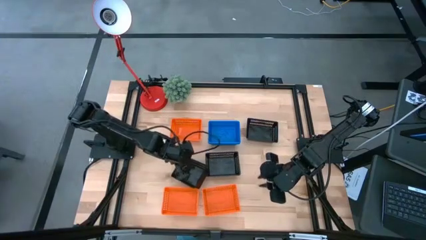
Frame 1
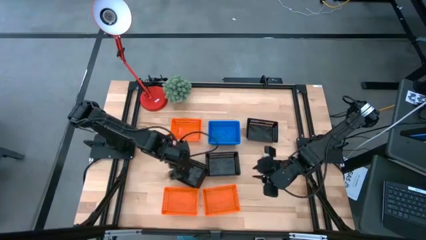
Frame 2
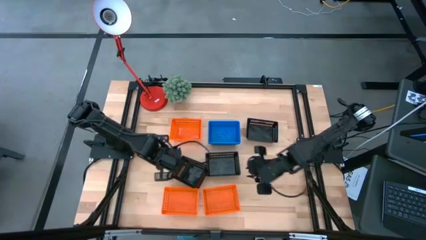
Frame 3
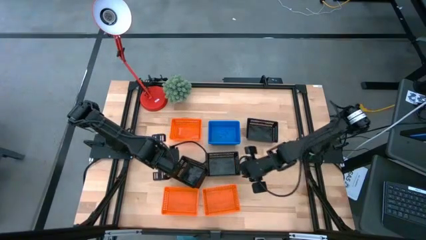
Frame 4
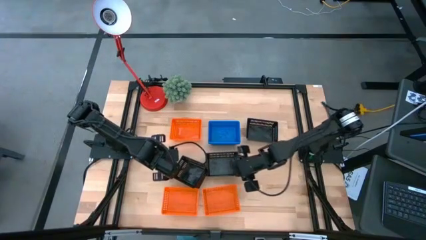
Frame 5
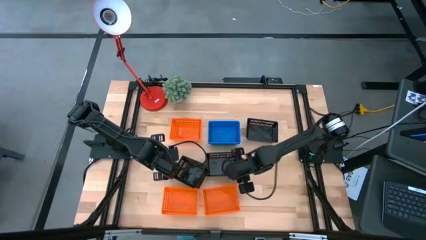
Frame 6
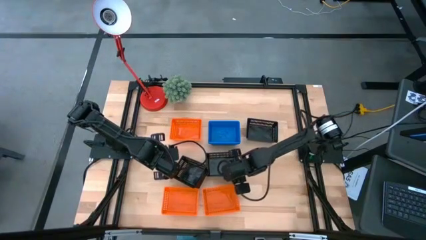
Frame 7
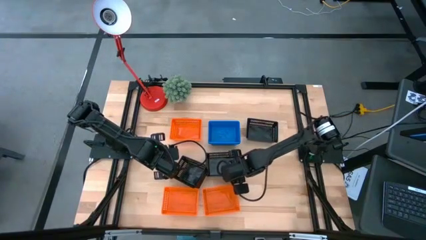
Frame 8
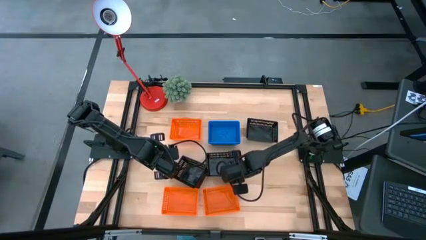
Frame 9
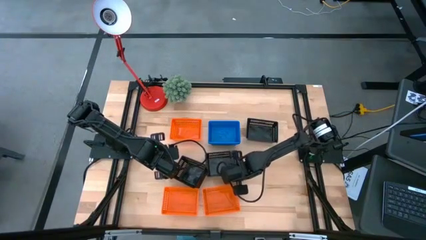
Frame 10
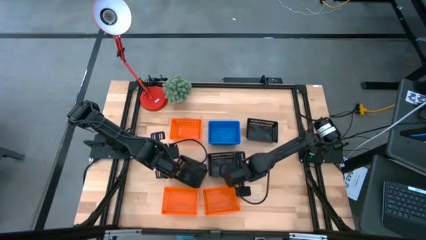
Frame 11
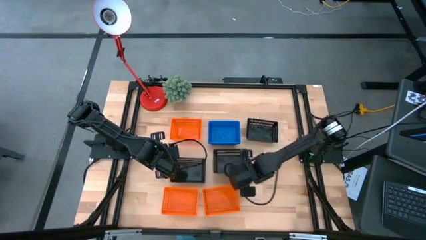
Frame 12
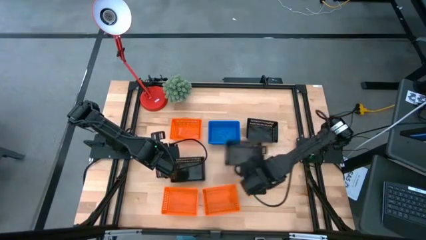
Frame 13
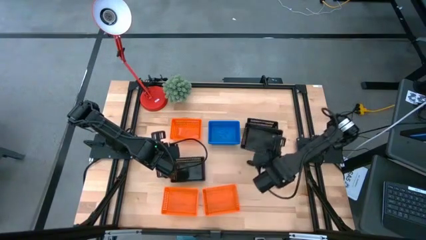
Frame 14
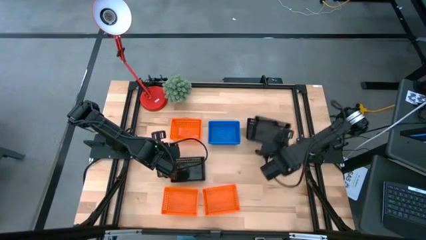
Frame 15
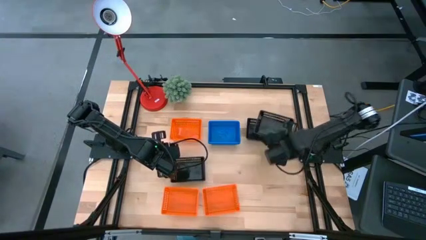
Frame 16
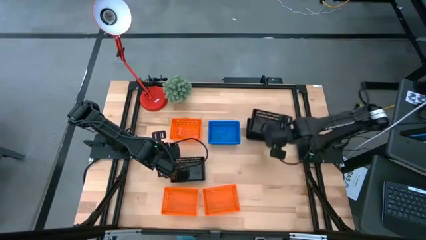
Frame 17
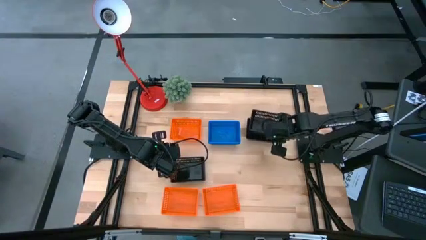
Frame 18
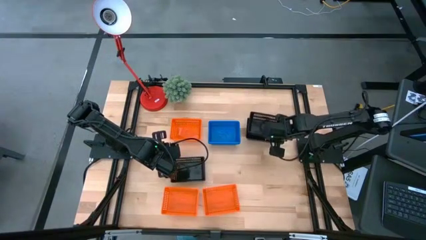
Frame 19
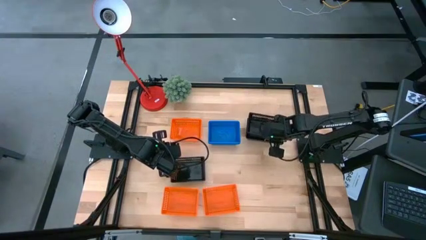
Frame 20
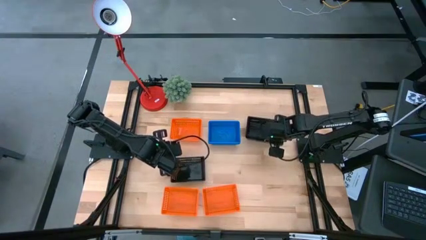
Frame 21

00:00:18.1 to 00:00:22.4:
Stack the bottom right black bin on the top black bin

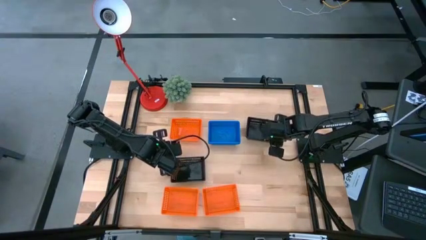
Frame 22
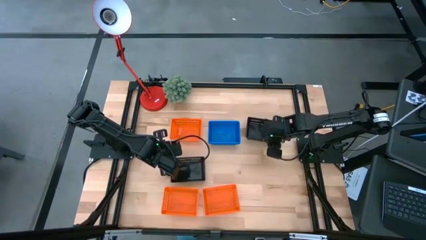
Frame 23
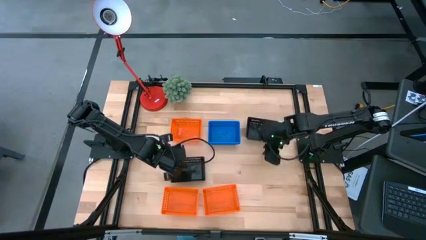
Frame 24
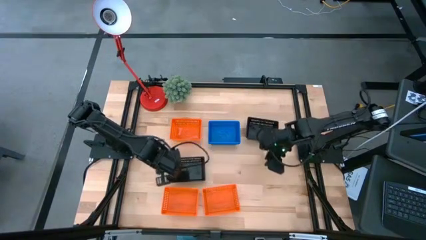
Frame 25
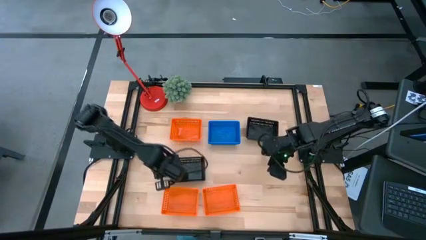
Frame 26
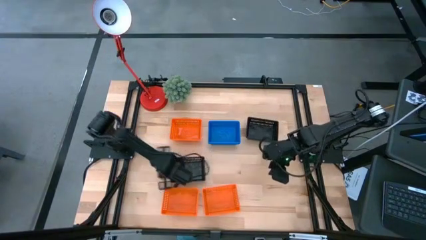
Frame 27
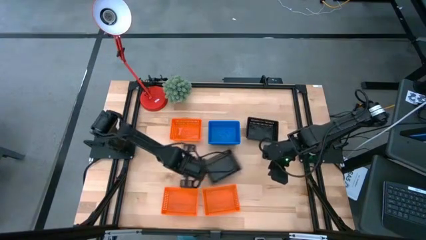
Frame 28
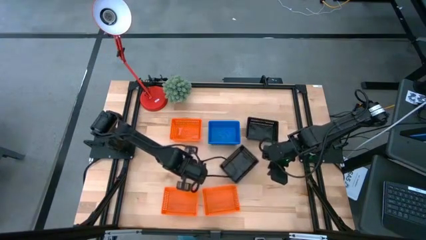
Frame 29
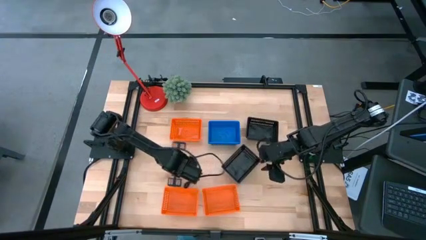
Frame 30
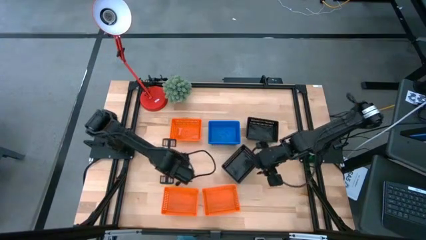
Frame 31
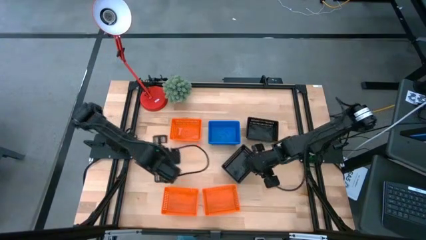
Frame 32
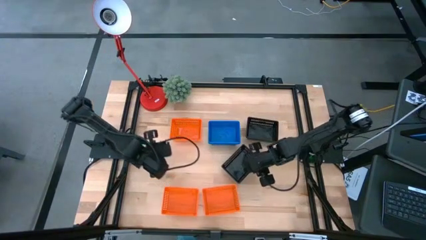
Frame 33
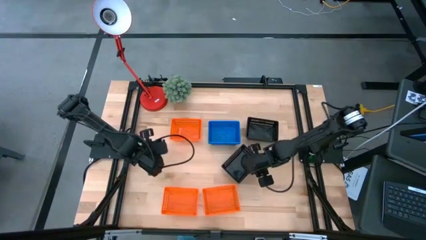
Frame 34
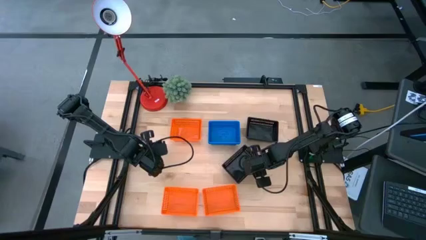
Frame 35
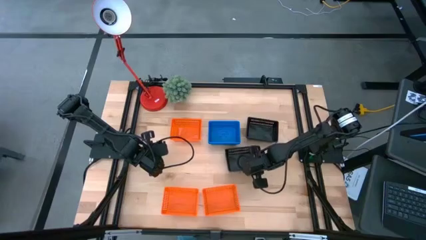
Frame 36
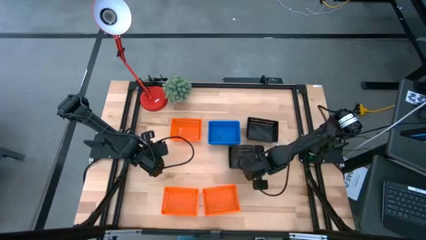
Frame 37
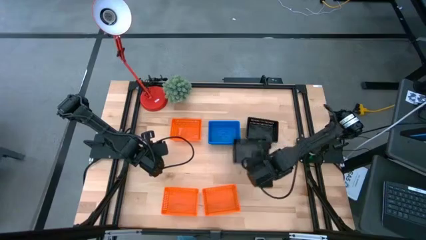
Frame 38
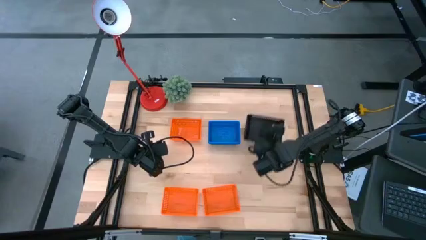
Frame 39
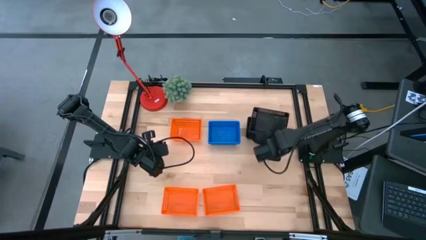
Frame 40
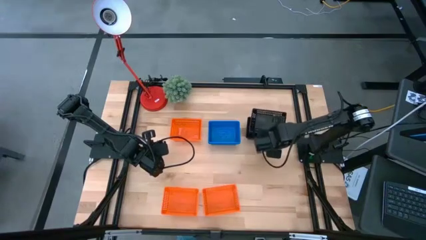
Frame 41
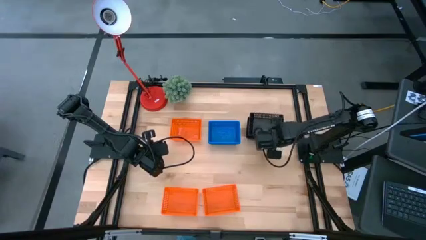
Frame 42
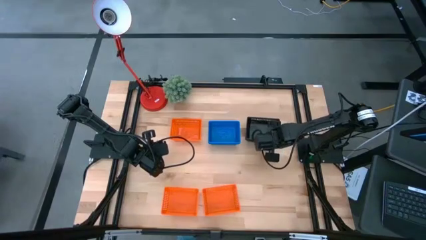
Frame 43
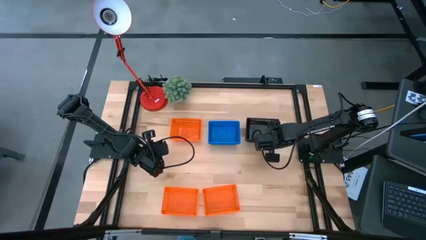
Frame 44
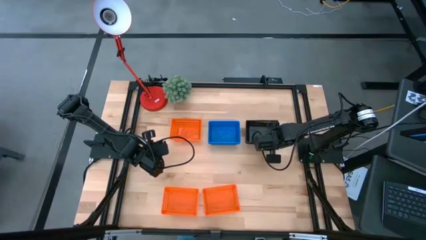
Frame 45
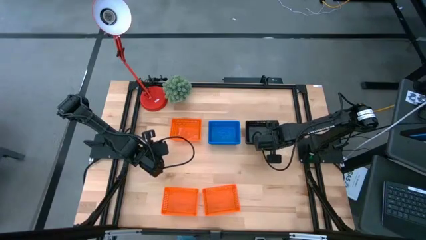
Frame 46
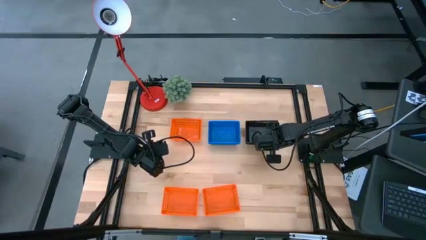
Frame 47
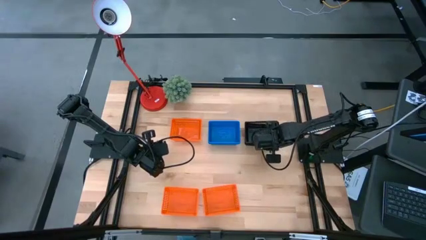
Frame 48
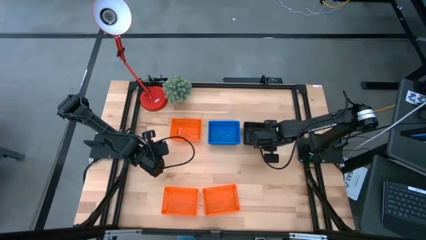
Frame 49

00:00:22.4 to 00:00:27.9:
Stack the bottom black bin on the top black bin

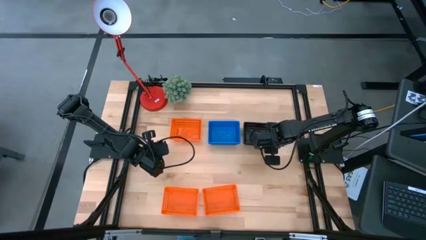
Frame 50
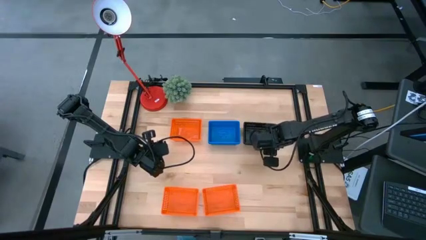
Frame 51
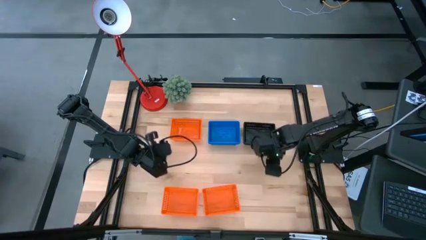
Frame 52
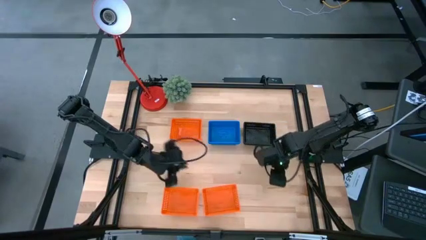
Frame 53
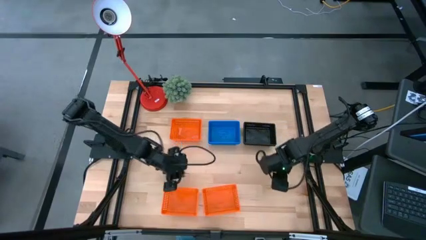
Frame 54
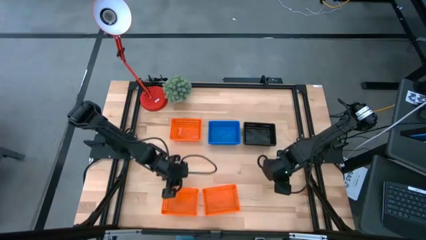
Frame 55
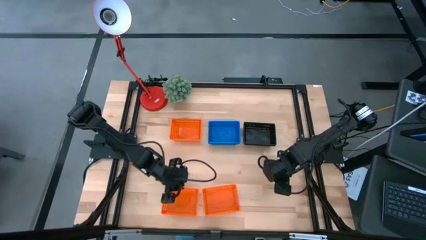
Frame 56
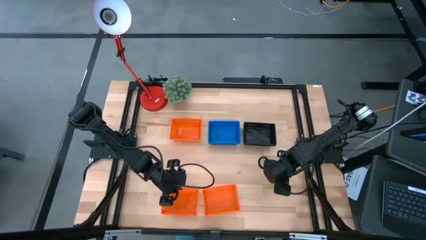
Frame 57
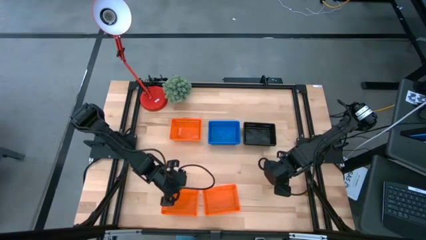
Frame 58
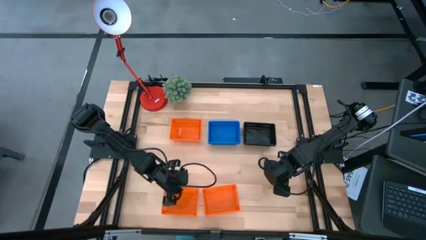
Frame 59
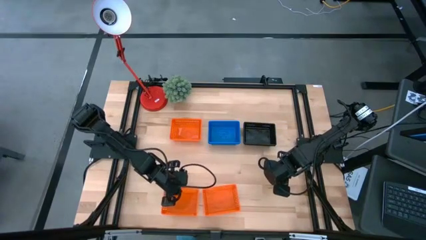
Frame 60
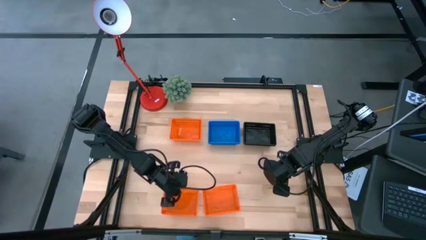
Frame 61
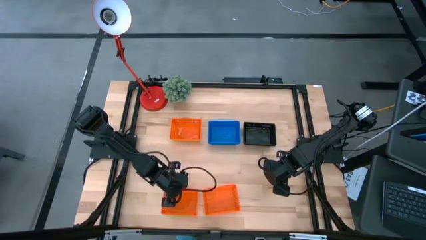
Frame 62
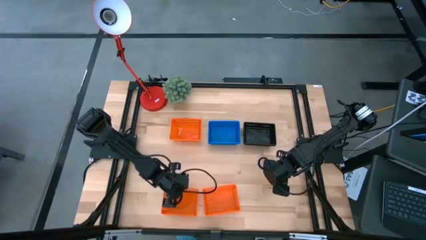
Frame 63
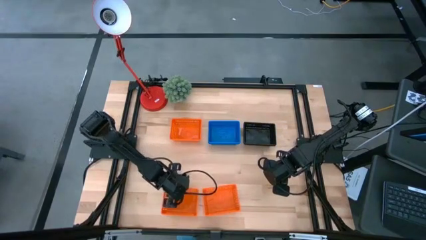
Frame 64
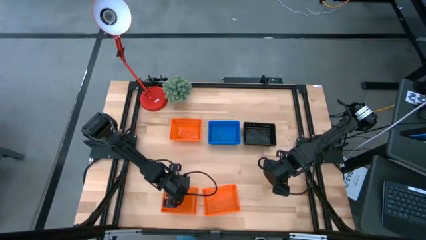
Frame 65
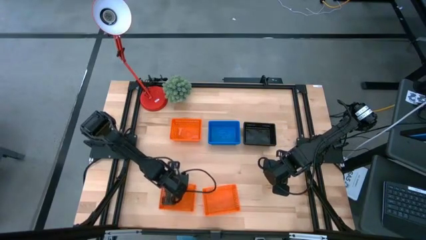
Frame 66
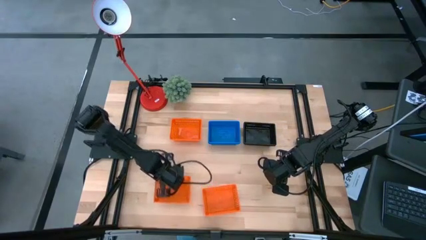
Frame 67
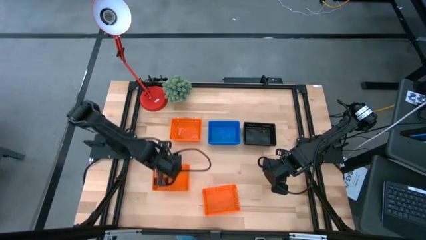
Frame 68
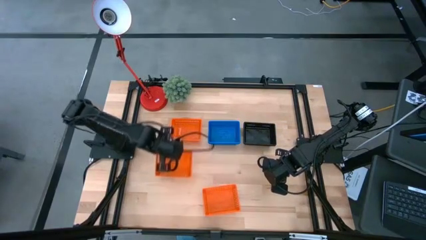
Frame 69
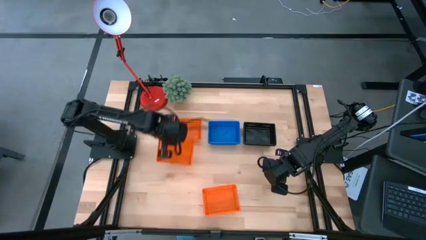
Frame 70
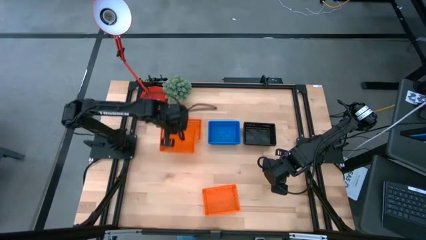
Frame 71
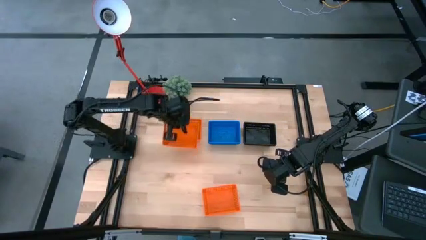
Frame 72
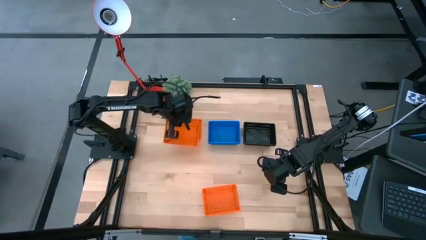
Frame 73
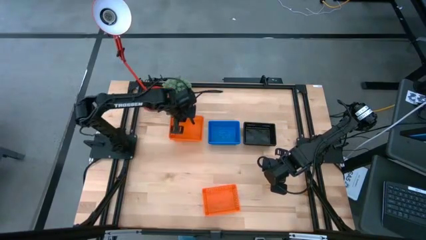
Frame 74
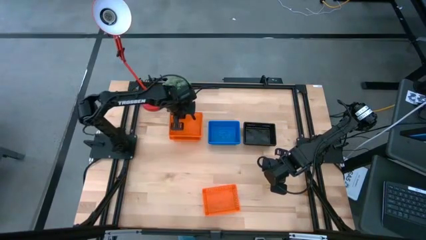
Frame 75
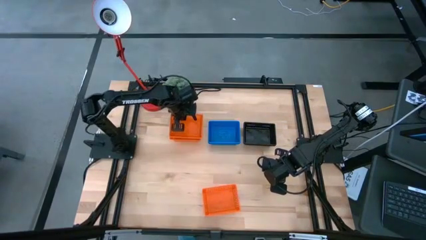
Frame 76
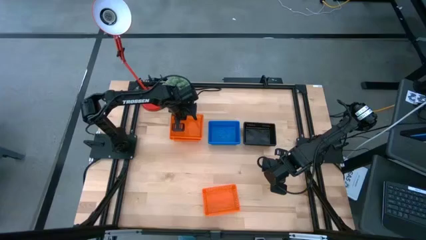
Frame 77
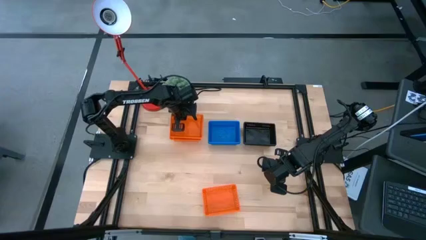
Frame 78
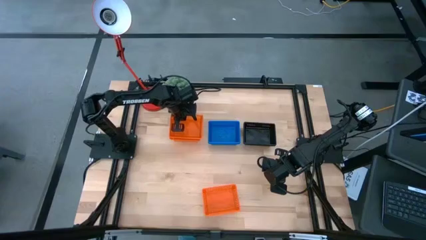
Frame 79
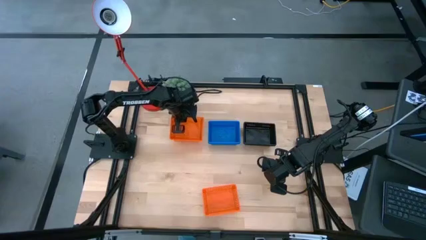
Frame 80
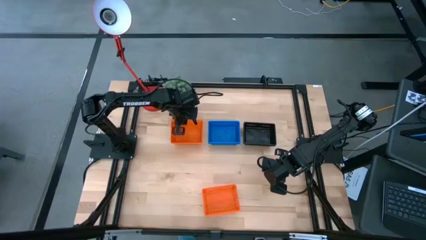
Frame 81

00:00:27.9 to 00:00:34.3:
Stack the bottom left orange bin on the top orange bin

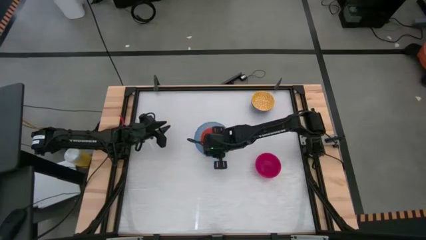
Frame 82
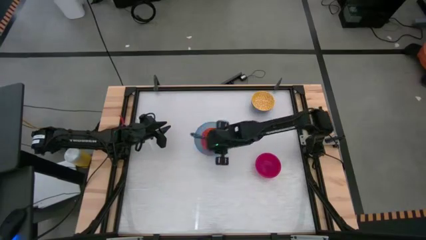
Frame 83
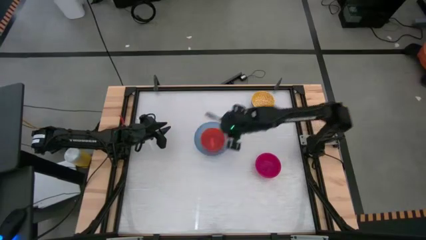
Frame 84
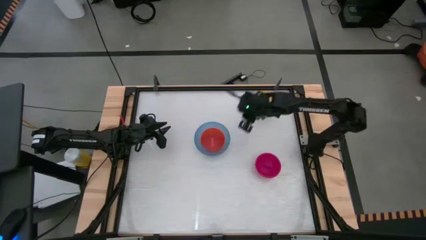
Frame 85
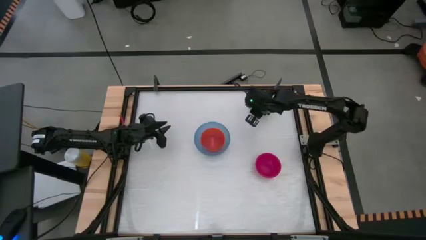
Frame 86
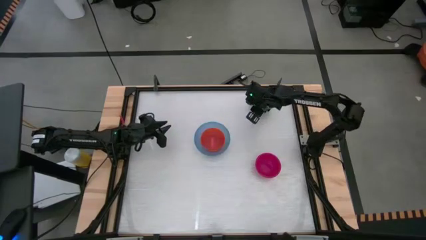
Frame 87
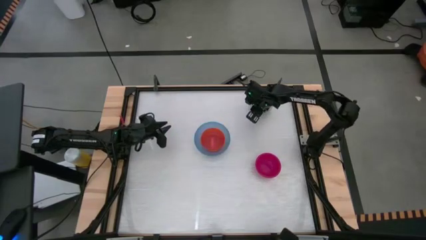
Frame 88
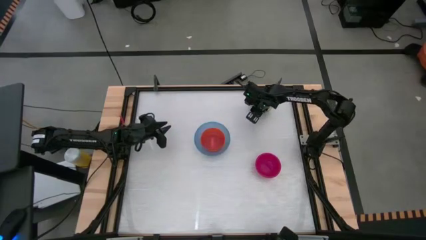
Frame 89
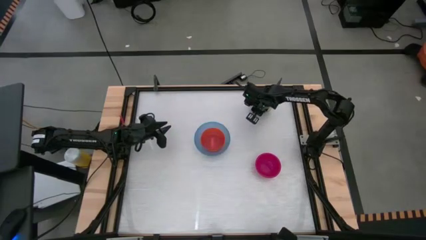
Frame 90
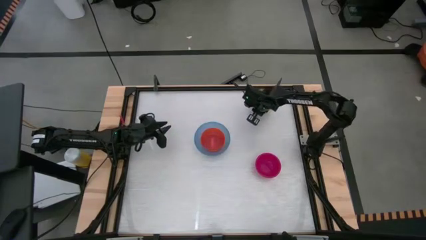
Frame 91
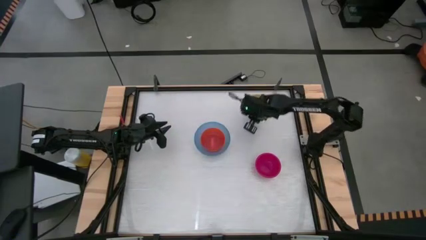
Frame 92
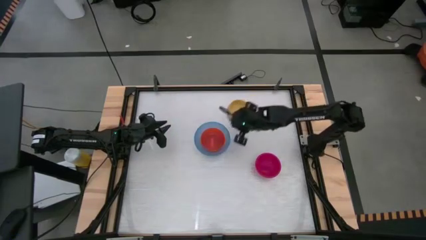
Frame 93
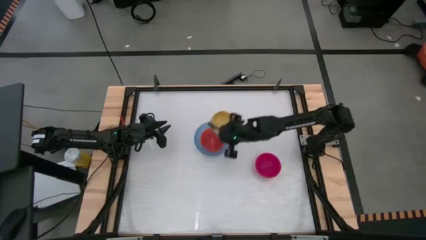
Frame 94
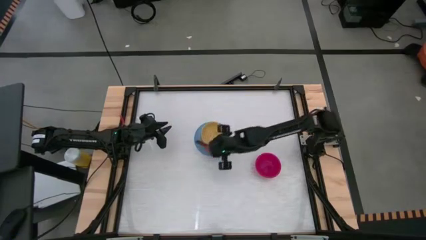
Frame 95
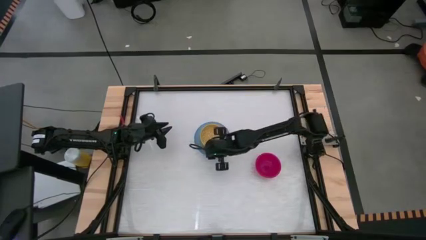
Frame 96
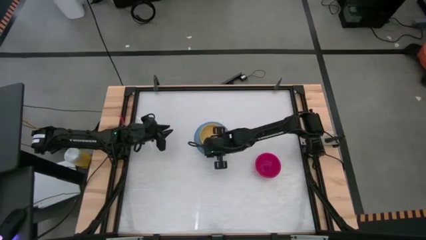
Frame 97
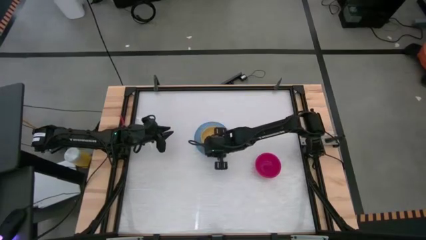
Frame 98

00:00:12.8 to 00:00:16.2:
Stack the yellow patterned bowl on top of the orange bowl
